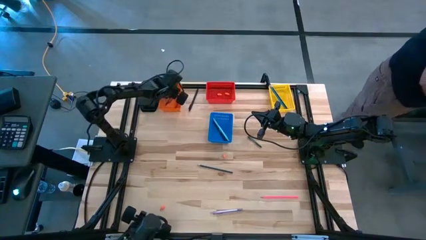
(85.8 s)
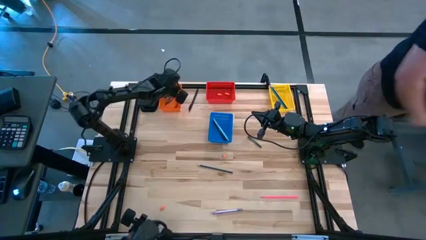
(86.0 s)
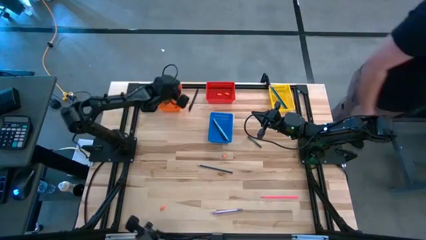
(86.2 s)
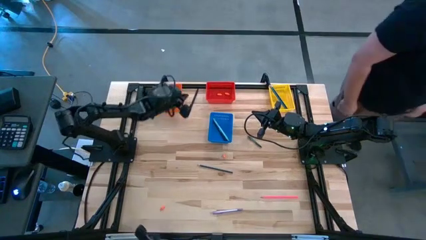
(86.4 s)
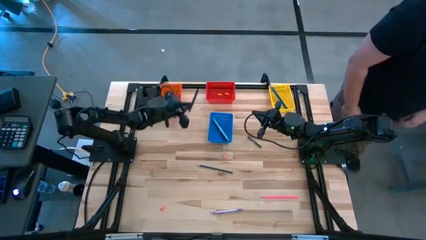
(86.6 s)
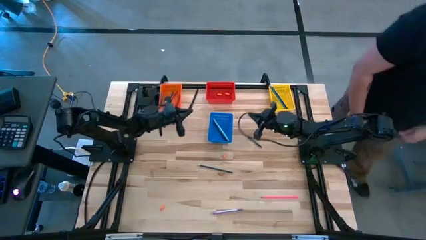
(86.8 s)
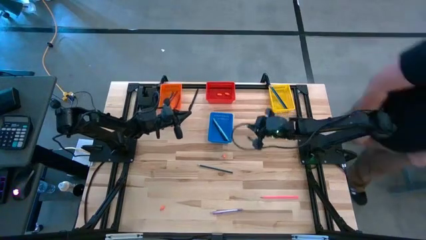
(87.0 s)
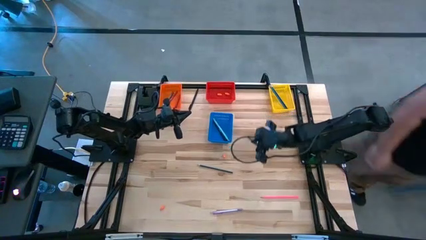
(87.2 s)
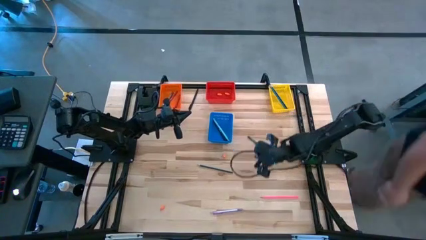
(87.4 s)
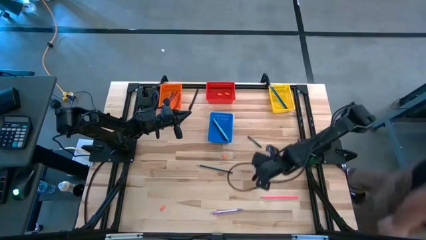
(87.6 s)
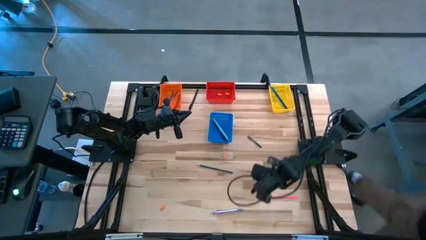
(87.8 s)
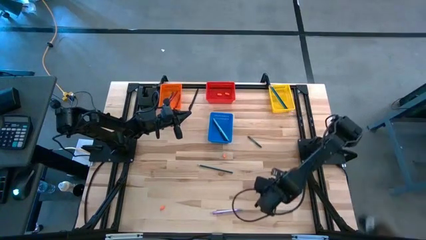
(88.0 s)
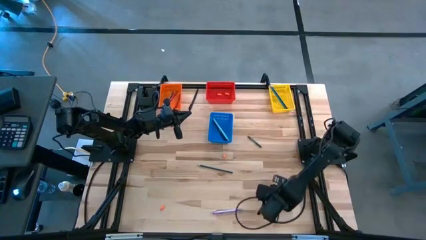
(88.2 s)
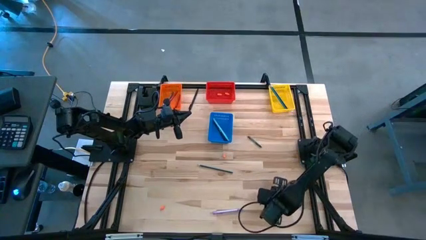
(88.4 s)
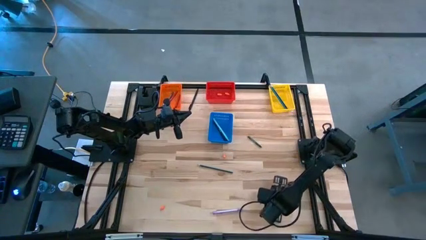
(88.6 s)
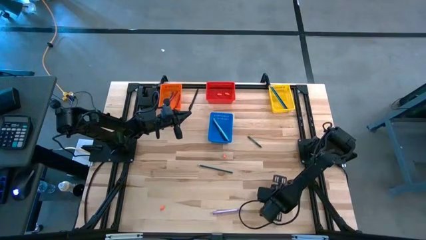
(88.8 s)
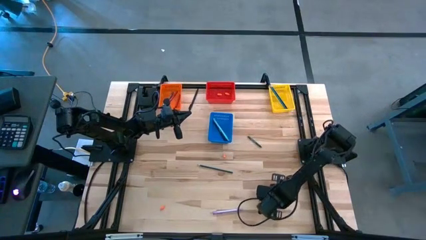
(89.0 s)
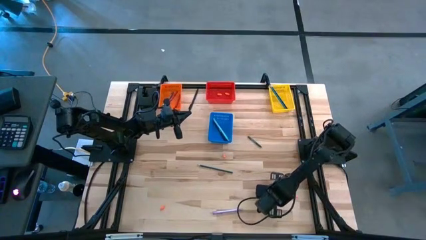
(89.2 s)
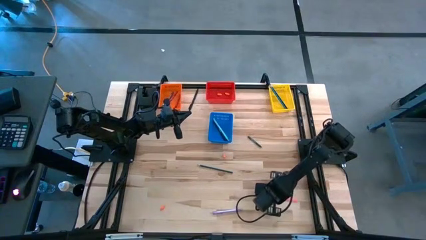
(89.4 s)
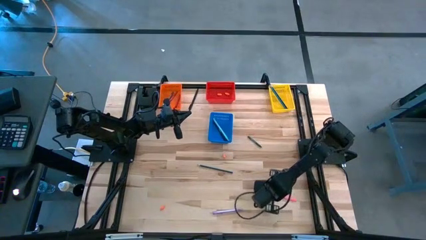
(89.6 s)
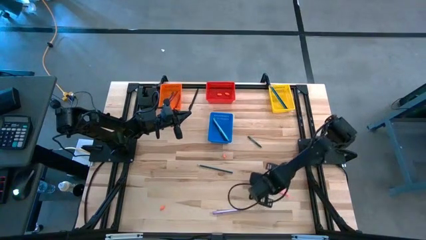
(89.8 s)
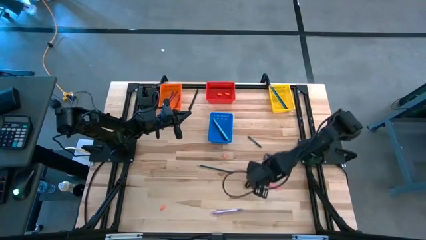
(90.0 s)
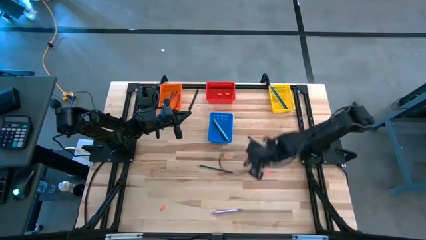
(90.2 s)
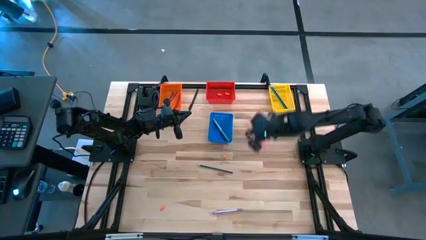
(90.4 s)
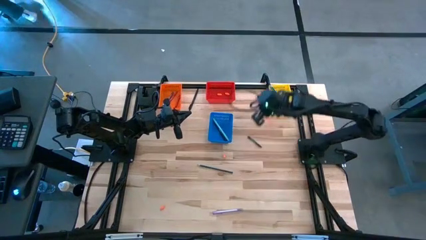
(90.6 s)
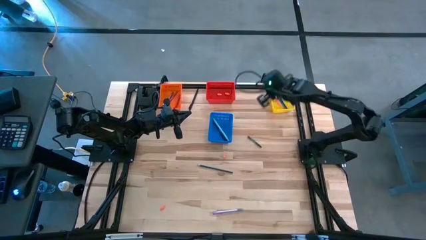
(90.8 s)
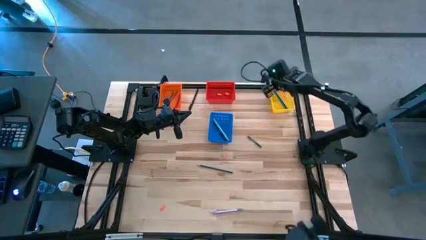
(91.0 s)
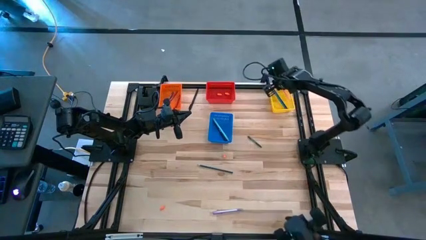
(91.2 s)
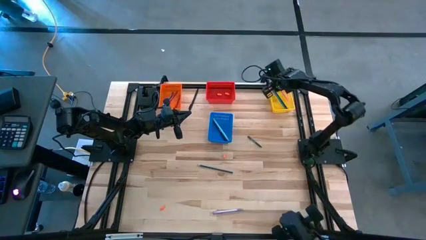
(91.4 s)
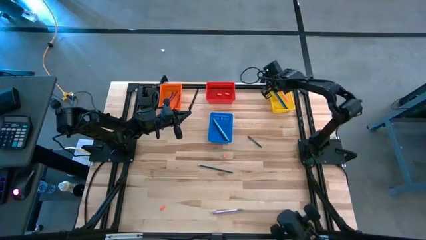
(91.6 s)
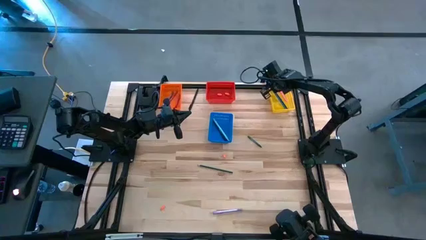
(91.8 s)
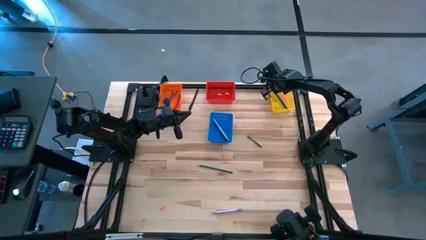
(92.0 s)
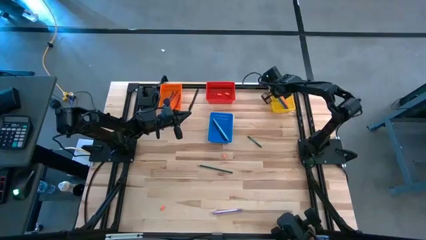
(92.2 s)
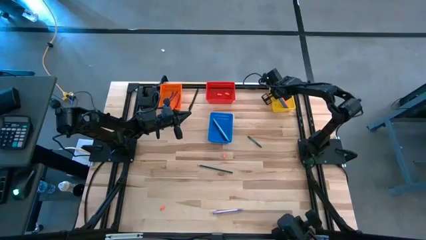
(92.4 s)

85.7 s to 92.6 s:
Task: Sort crayons/erasers/pens/pencils in bins
Put the pink pencil into the yellow bin

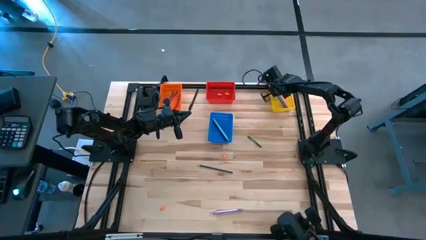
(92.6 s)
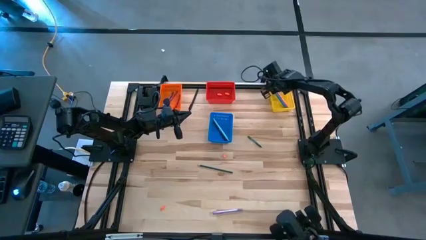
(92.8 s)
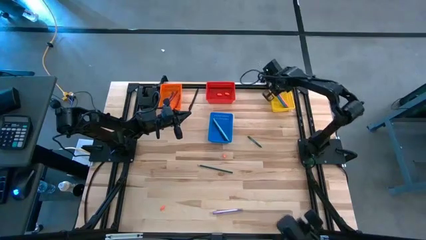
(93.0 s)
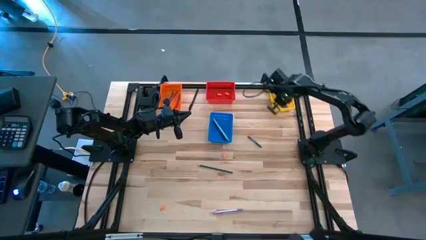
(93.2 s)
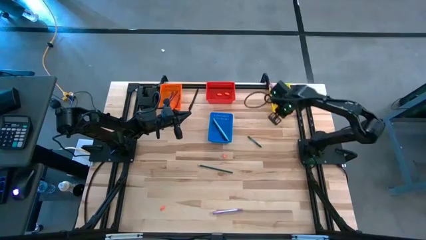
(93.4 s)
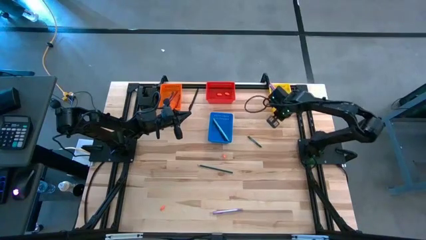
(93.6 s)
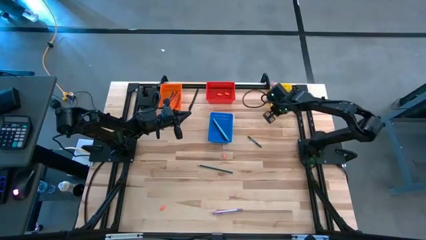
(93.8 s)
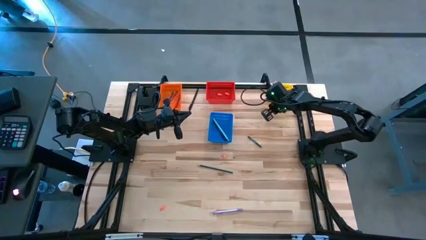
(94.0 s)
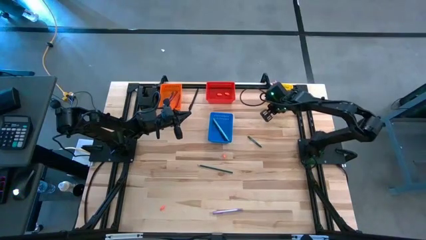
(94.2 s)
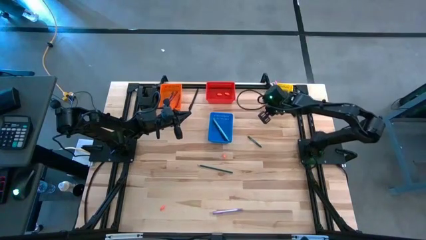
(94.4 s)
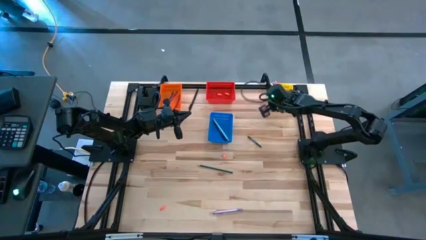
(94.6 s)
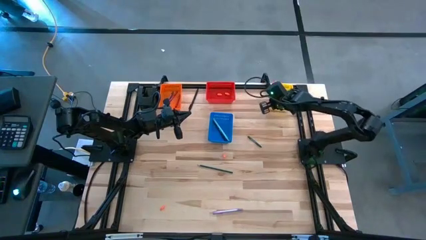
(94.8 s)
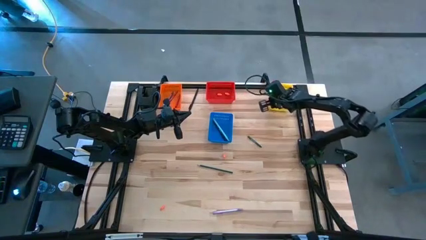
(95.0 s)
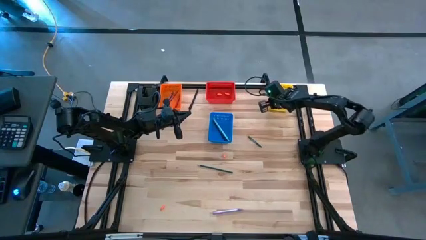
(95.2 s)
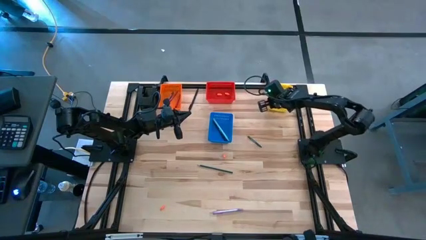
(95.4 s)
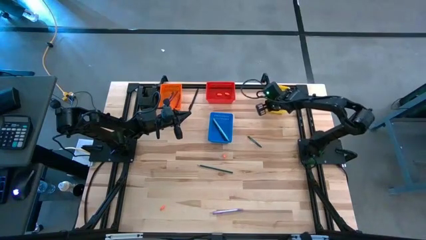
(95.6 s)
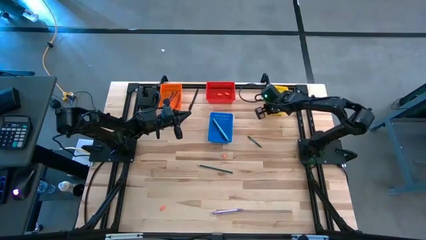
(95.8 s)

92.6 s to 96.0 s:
Adjust the yellow bin

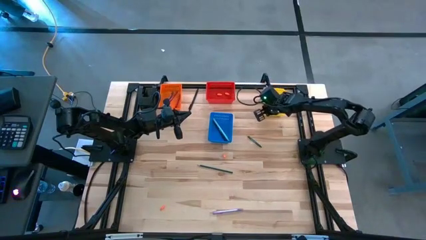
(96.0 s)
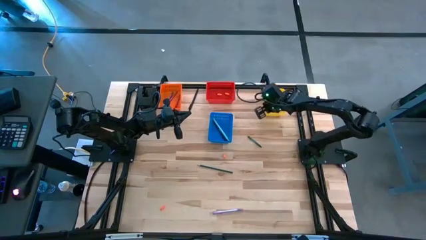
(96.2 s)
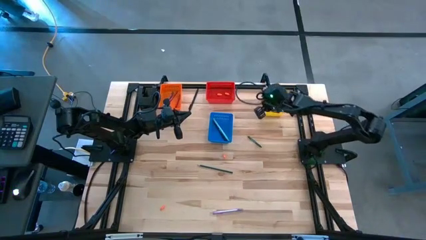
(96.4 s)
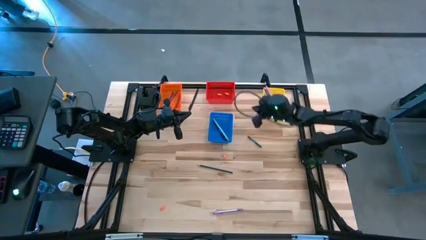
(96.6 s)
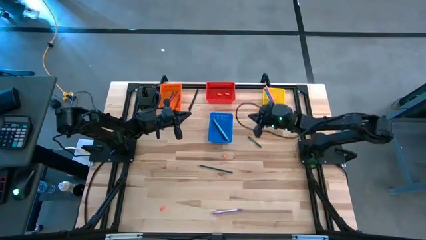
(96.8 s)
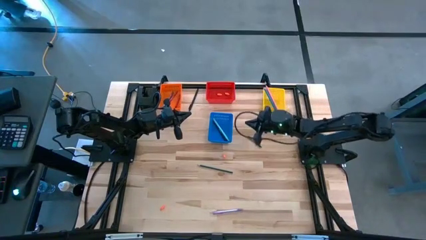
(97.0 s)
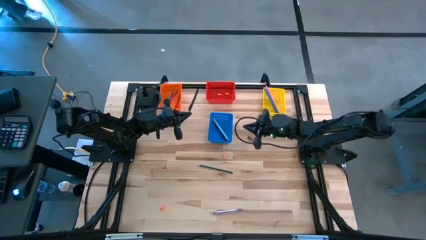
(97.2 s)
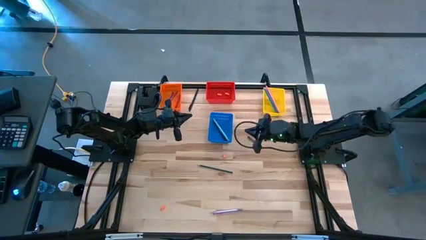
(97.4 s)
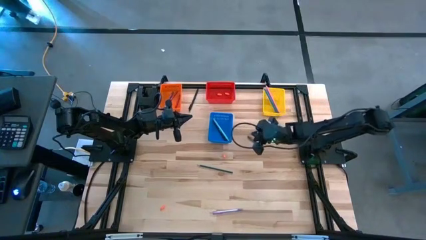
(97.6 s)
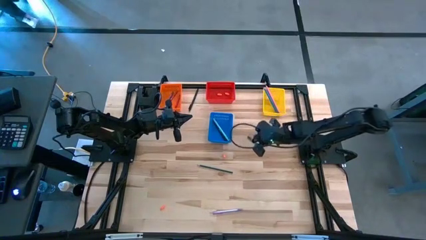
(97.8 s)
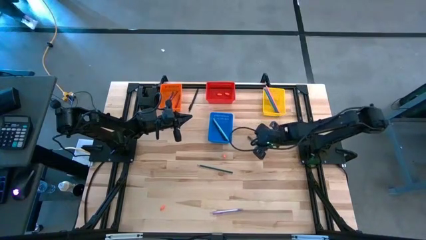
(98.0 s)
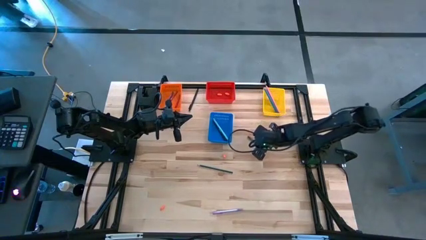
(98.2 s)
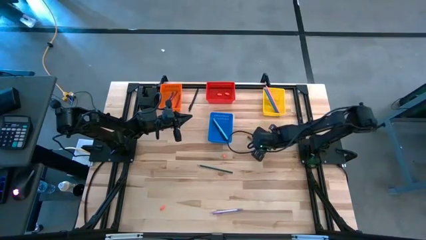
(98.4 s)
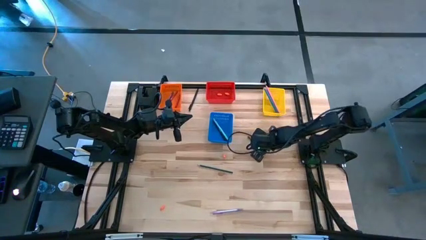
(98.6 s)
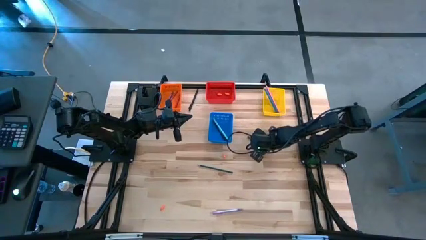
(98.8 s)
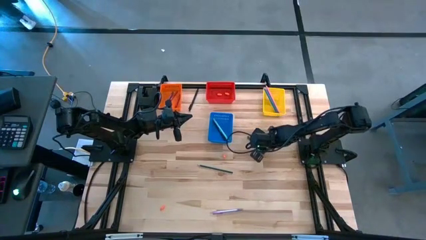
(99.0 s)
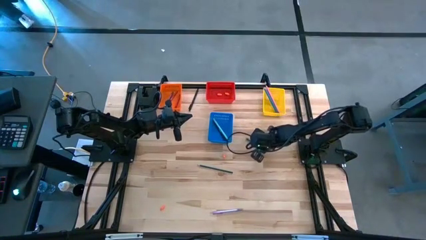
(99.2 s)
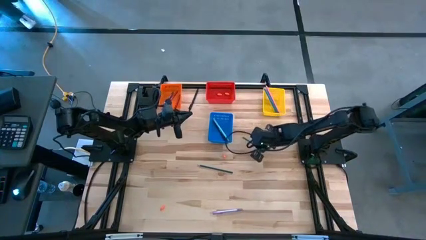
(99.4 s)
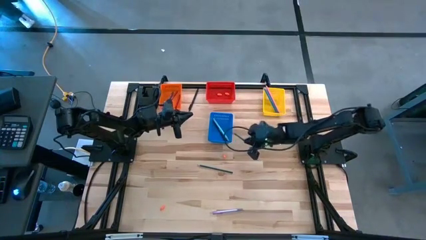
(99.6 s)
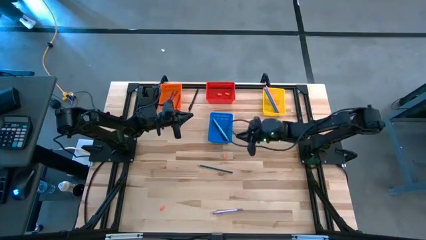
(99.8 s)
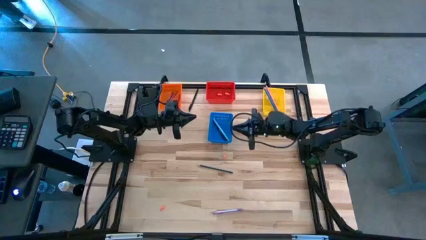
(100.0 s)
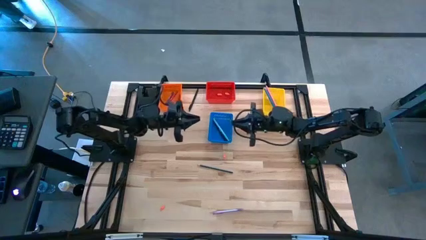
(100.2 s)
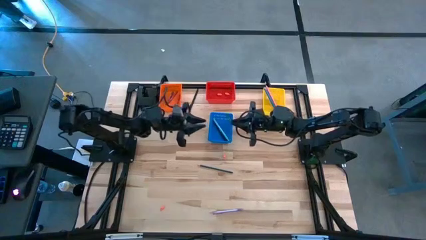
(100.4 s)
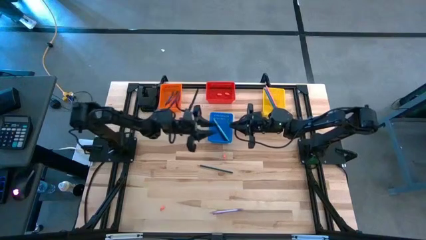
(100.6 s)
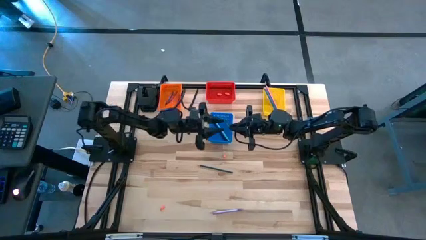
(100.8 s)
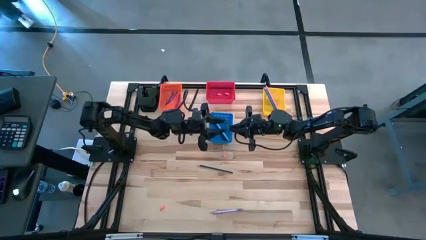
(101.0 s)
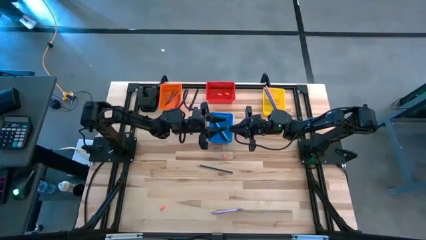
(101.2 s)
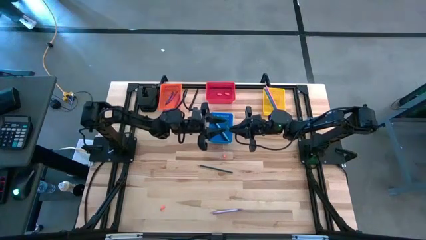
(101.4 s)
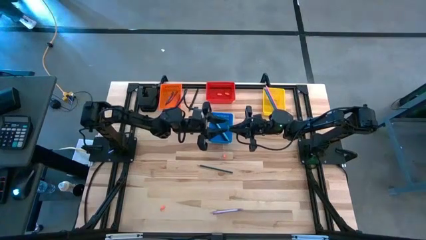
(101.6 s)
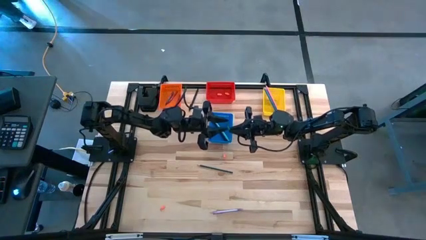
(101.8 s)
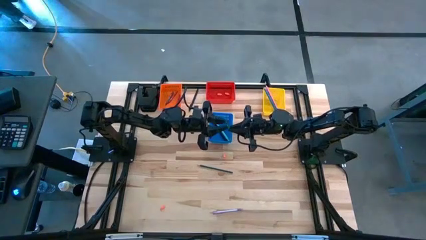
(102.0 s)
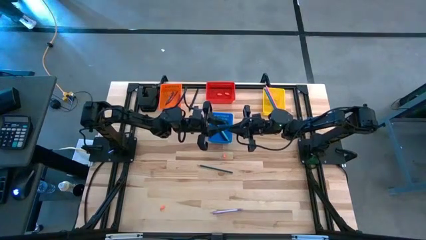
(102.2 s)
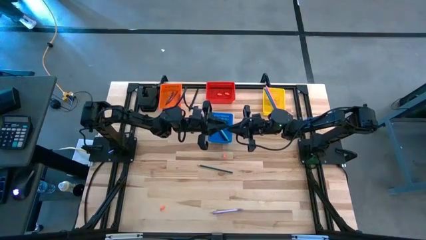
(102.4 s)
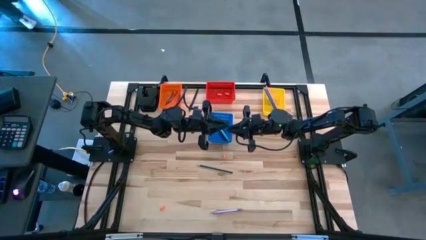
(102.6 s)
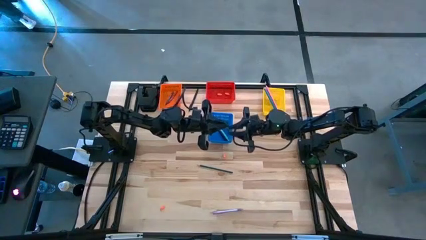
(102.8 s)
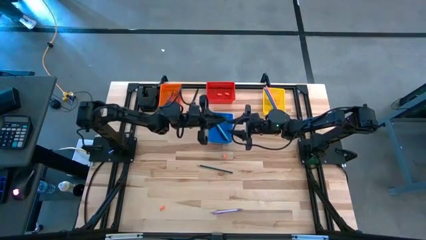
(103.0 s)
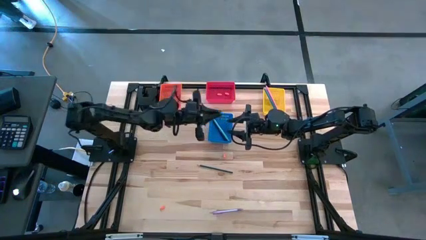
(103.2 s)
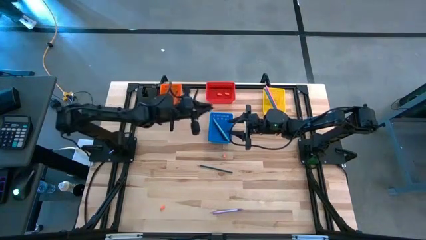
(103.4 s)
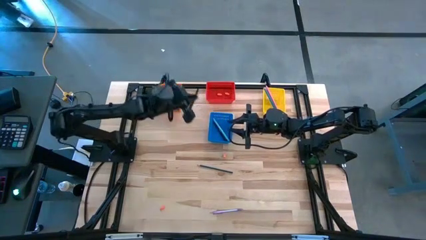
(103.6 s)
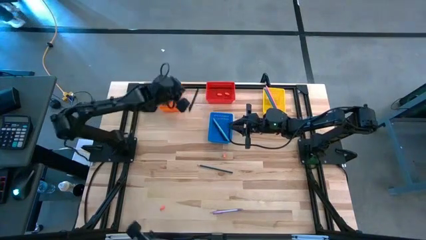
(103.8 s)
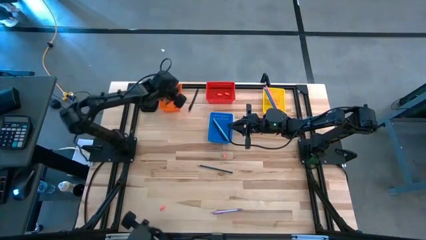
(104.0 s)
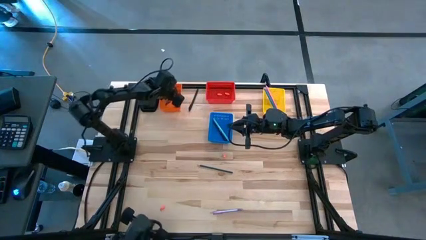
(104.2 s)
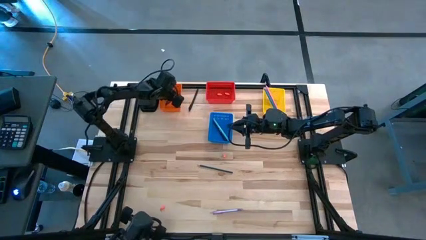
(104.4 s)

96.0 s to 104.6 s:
Put the dark green crayon into the orange bin
